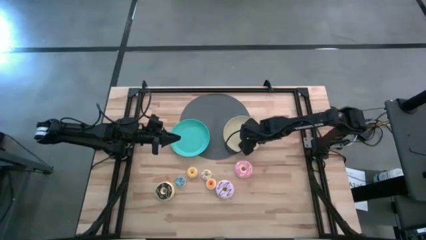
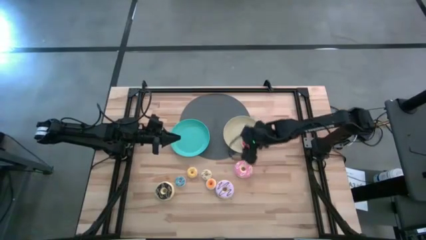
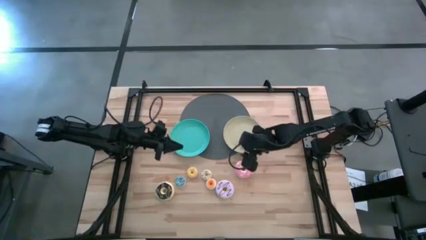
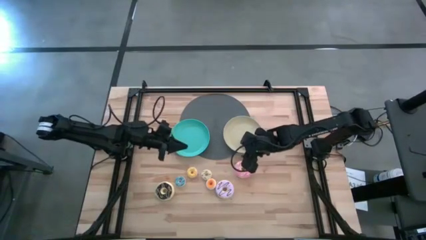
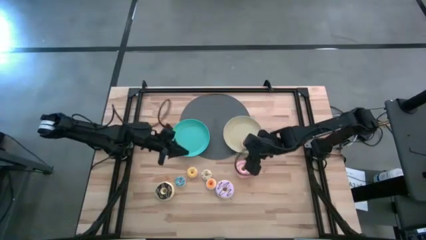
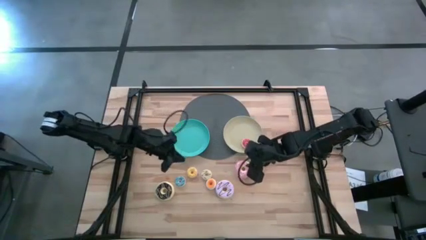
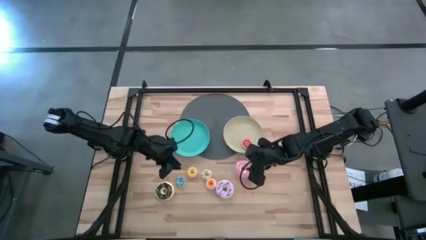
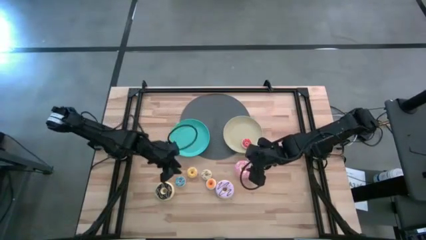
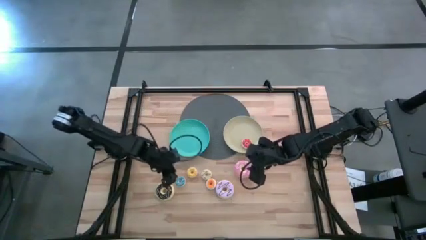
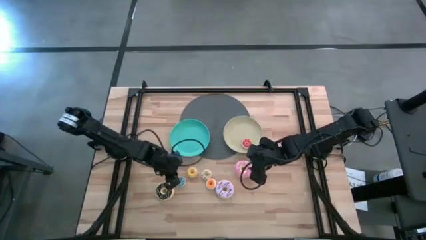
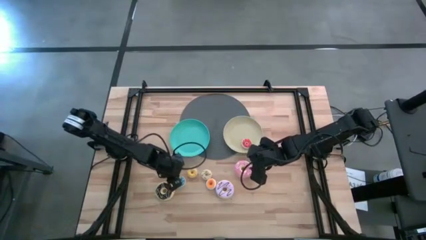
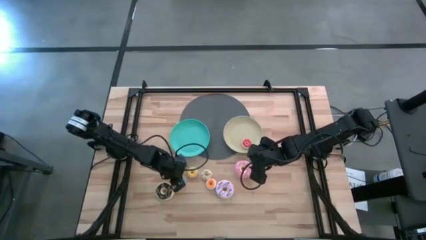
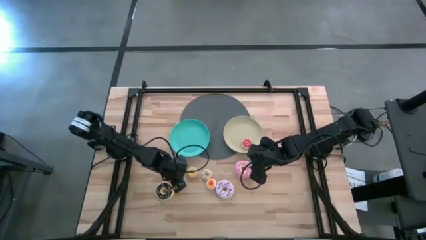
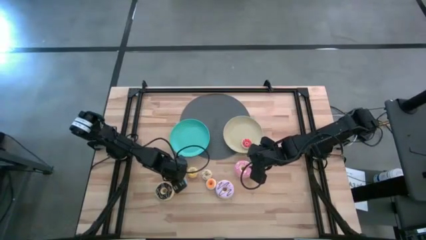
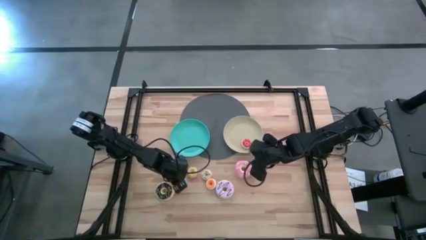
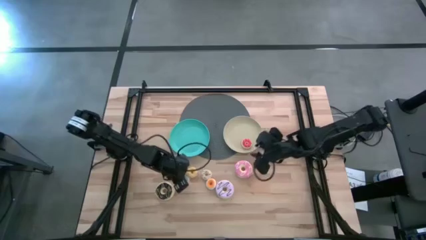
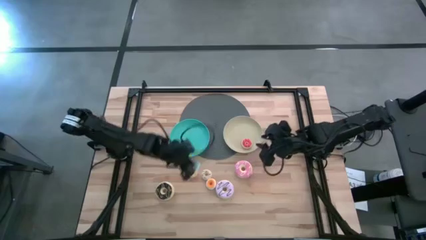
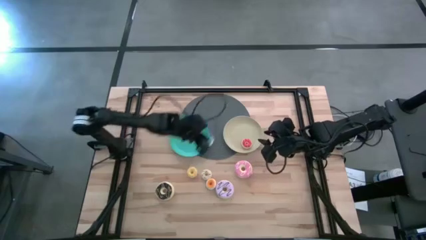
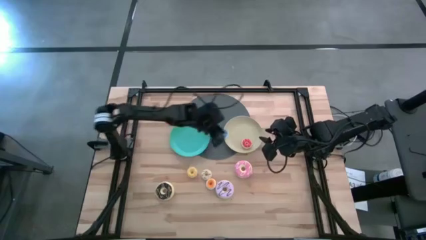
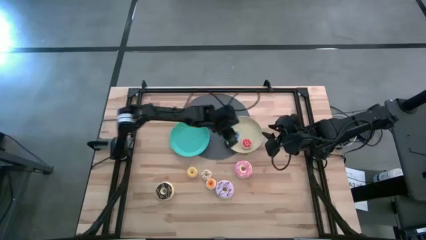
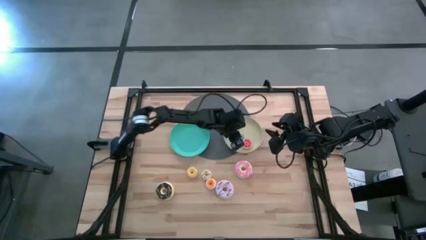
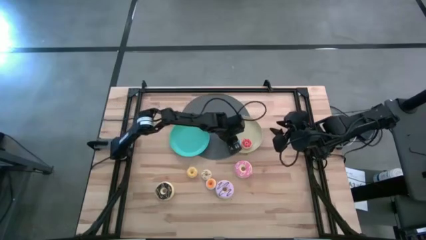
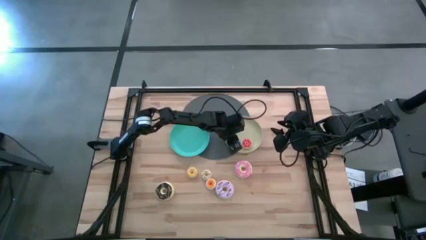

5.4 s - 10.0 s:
Task: Pick & Place donuts
Put the small blue donut on the light gray plate

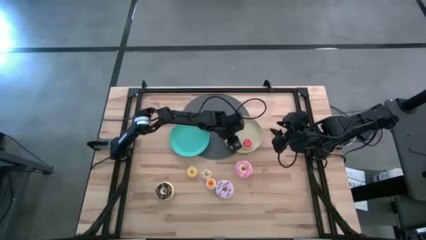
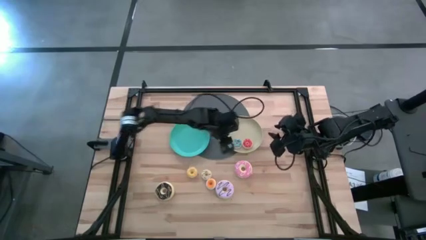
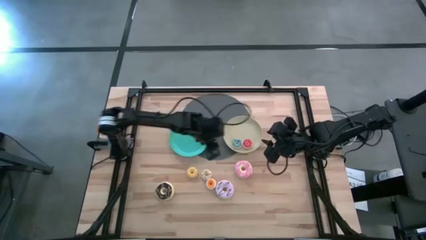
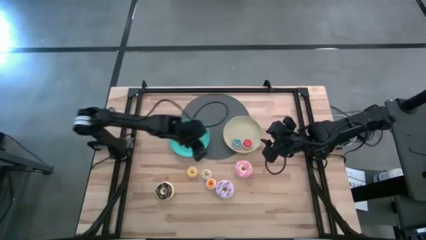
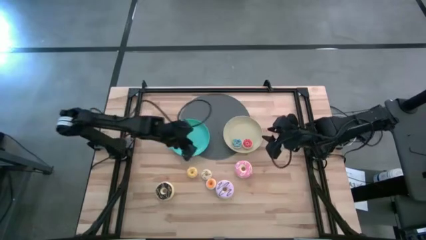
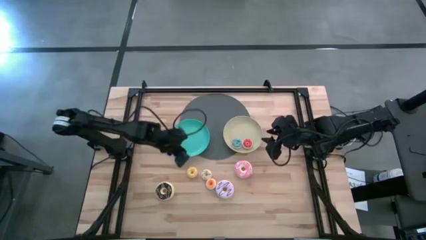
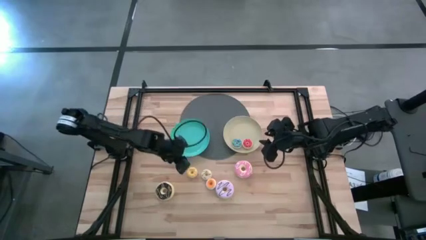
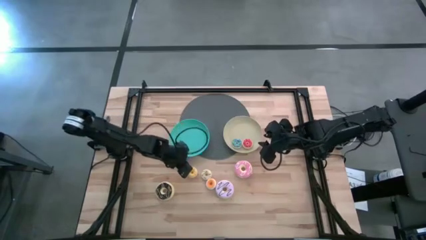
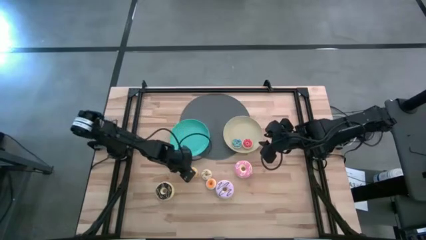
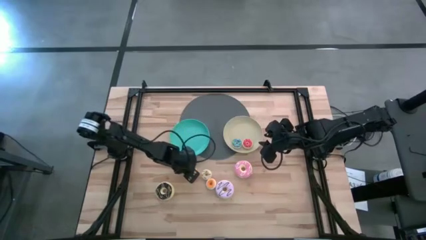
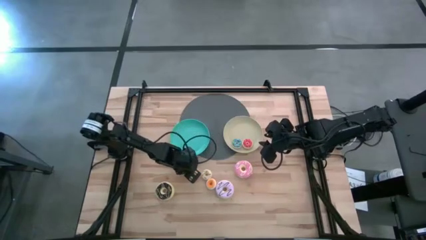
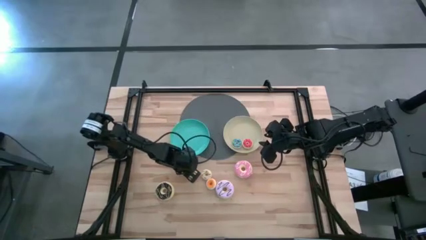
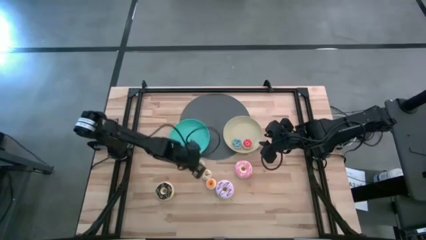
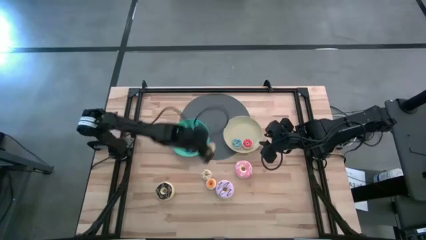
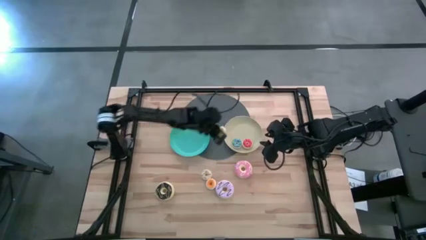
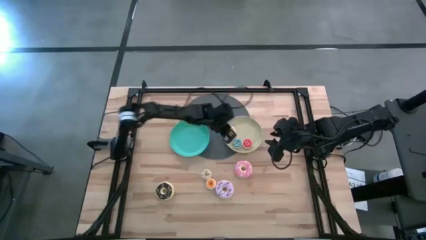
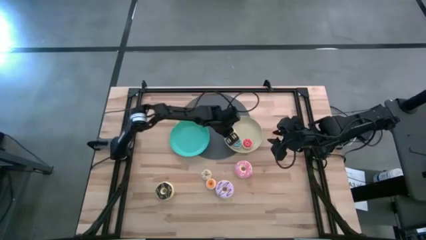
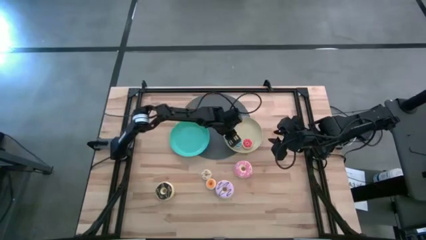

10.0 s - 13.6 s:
Put the small yellow donut on the light gray plate

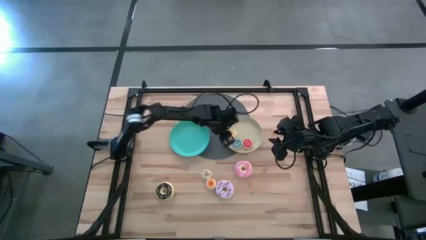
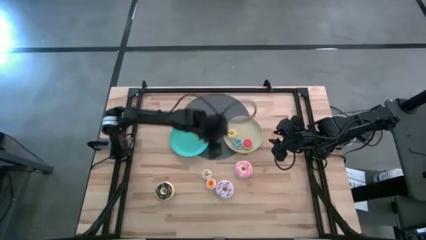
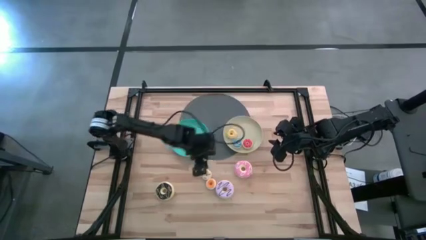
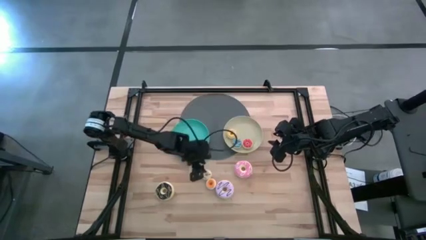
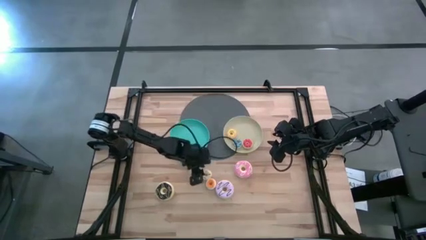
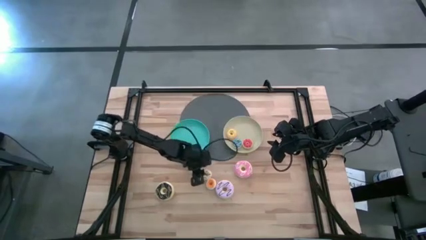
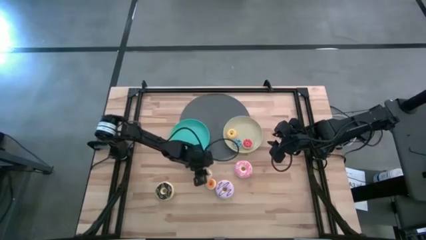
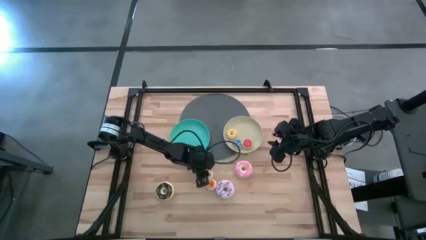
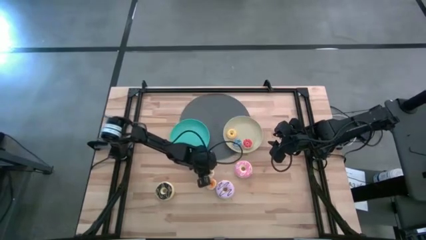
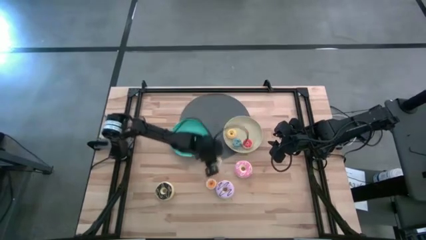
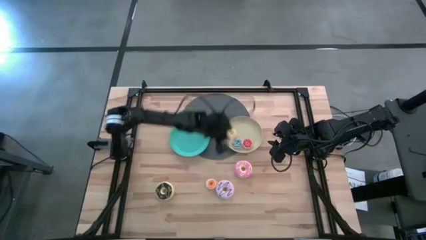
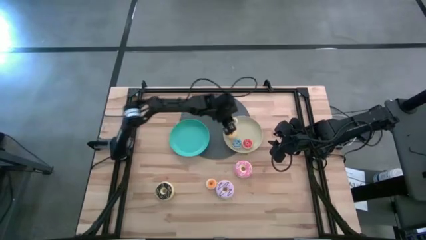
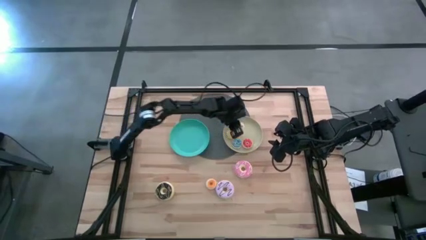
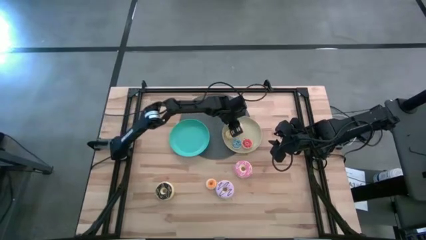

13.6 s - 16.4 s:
Put the small light green donut on the light gray plate

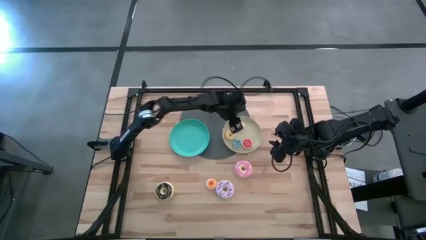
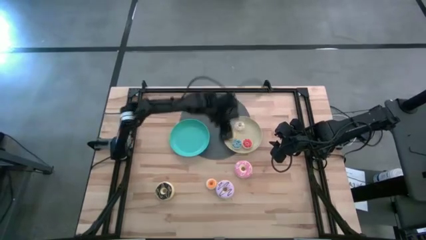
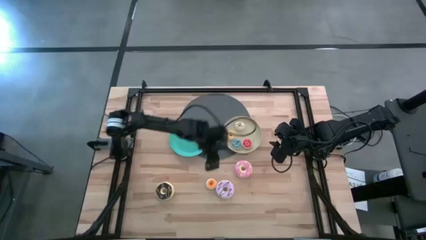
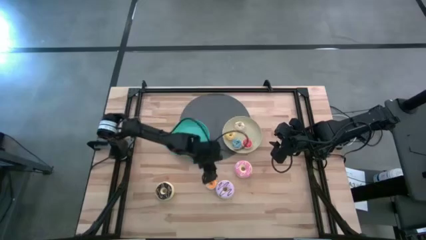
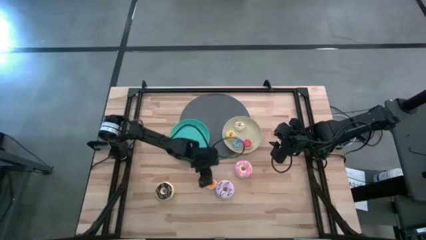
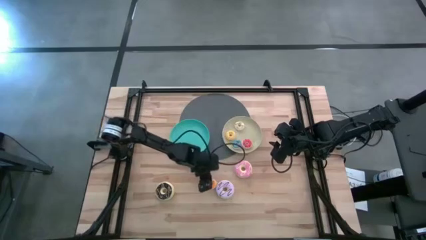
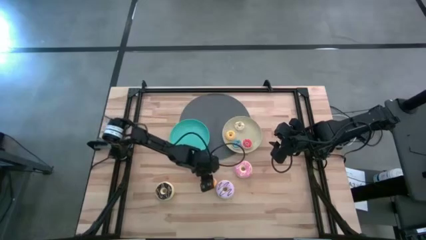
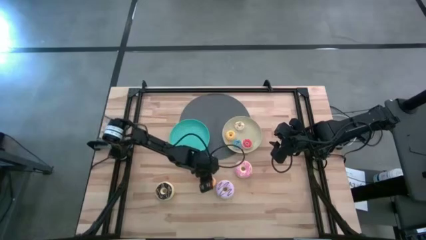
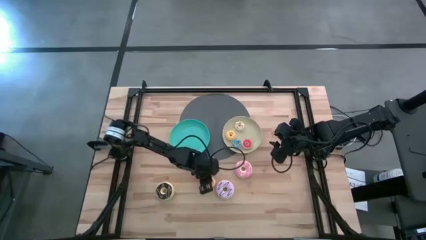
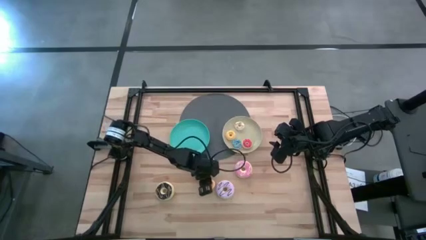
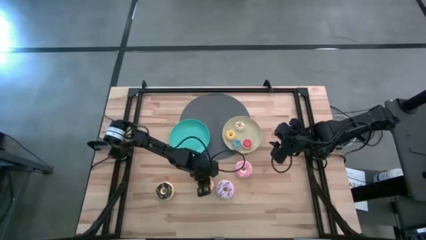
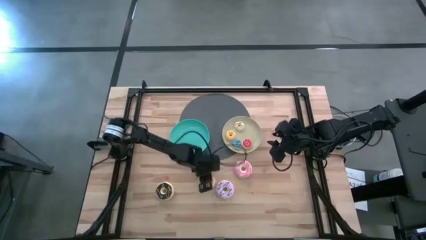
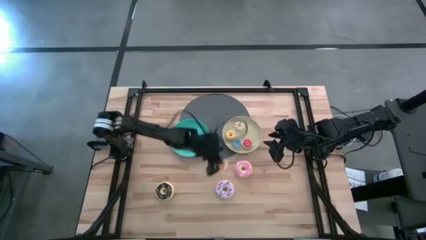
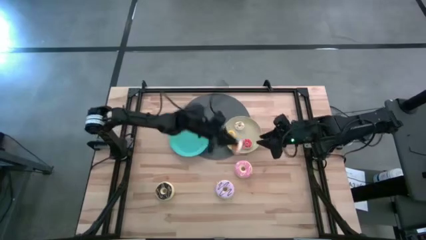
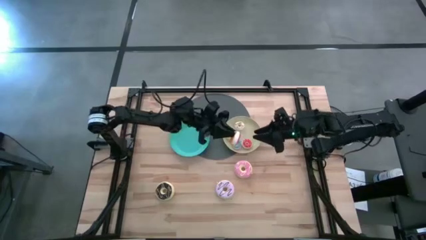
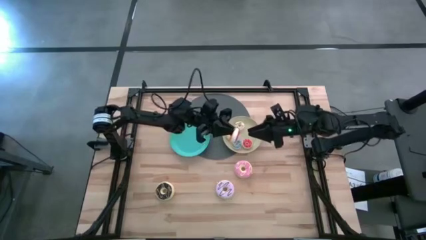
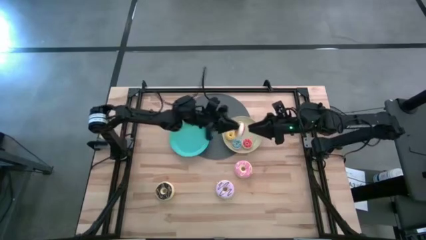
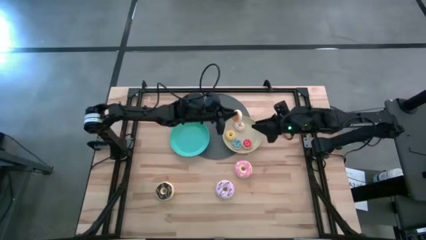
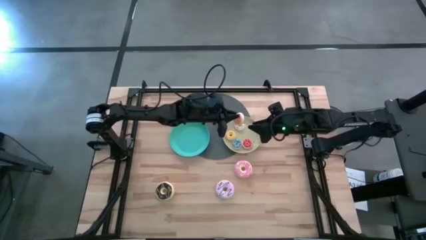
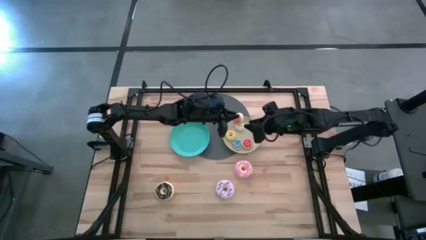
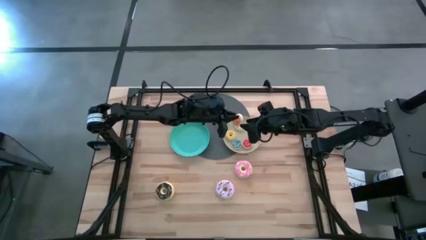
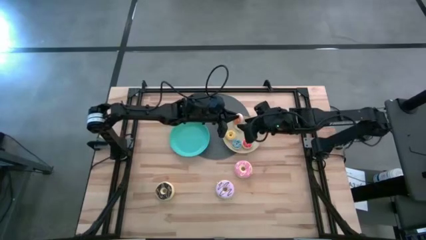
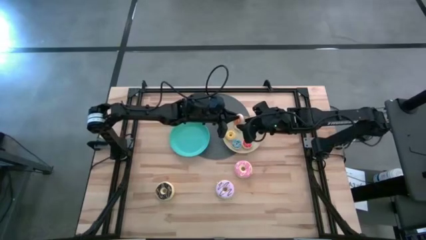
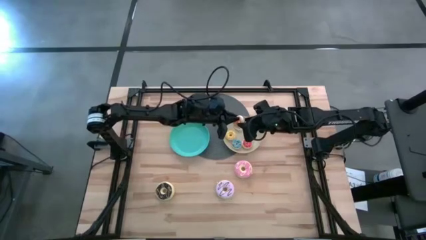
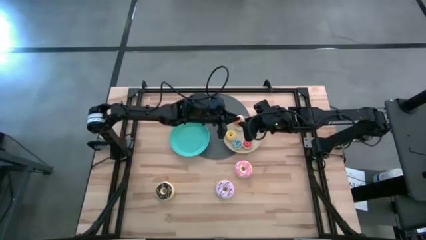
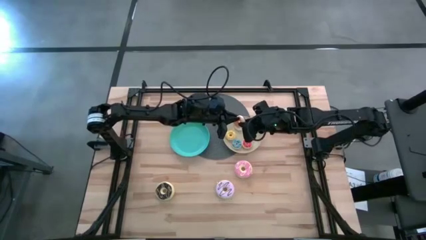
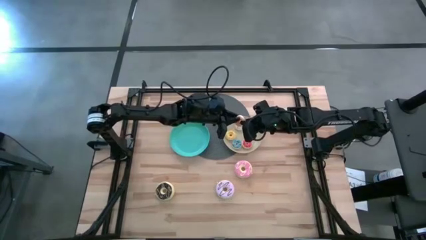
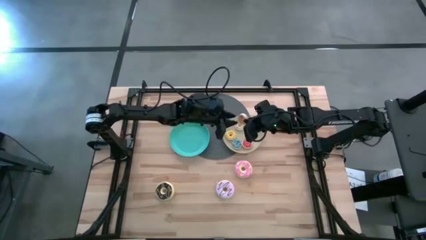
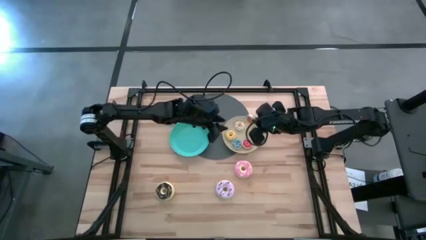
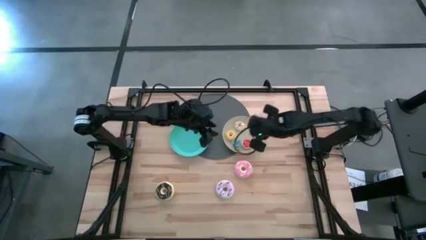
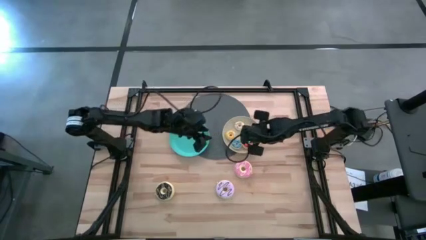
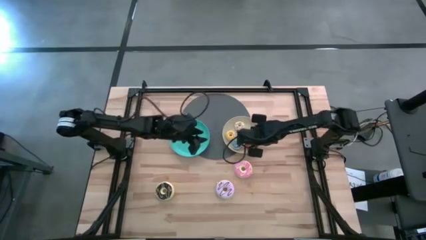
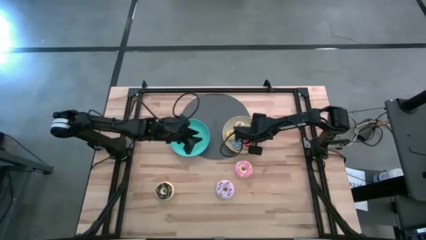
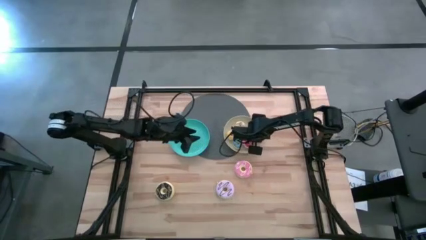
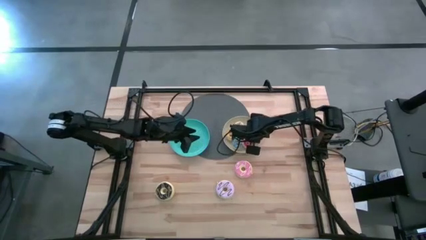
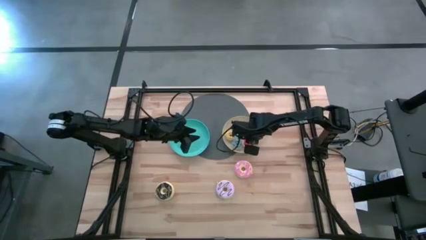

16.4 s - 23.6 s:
Put the small orange donut on the light gray plate
